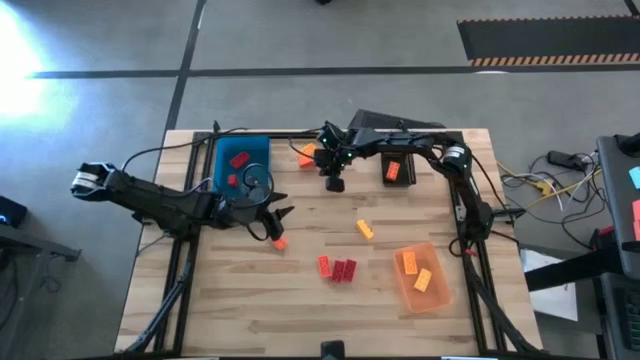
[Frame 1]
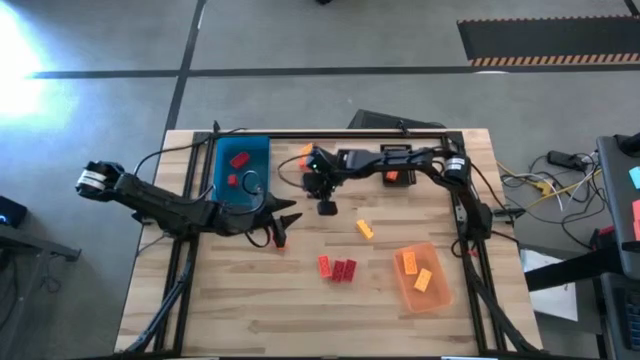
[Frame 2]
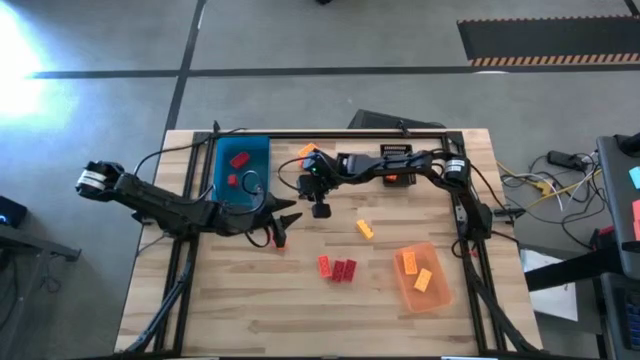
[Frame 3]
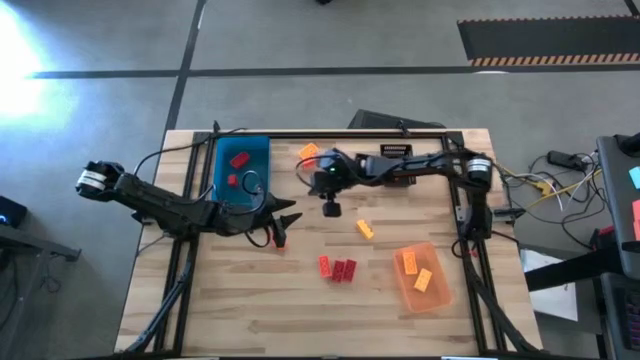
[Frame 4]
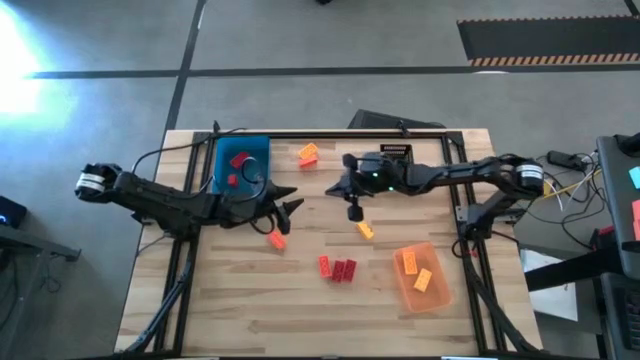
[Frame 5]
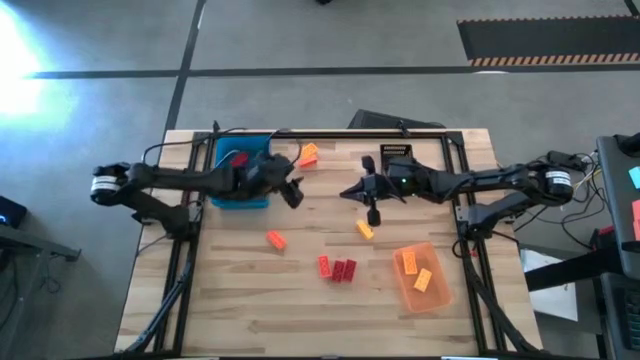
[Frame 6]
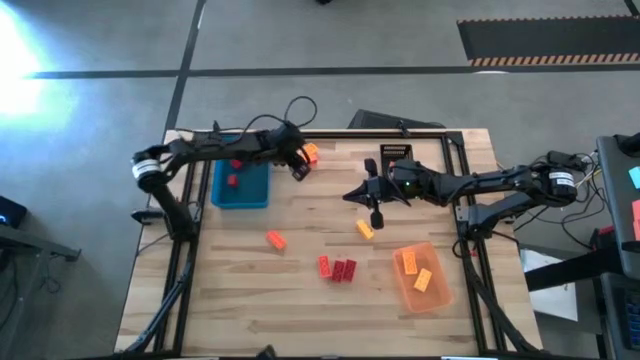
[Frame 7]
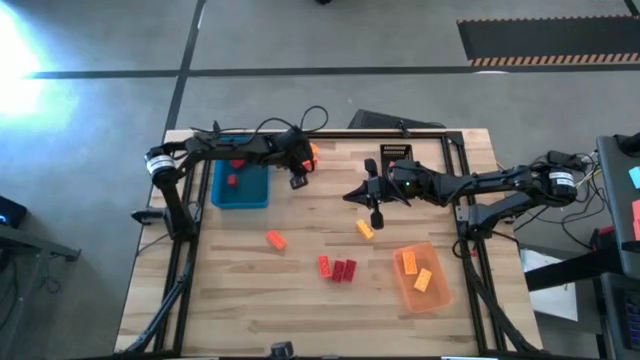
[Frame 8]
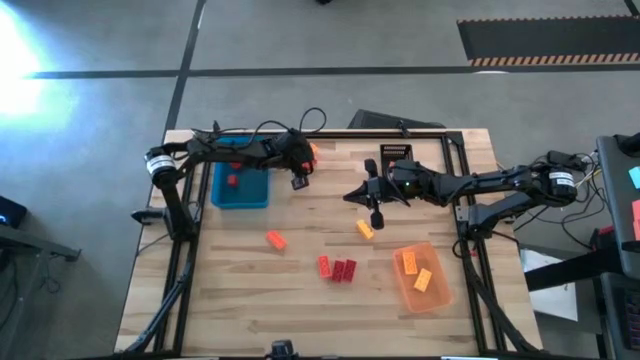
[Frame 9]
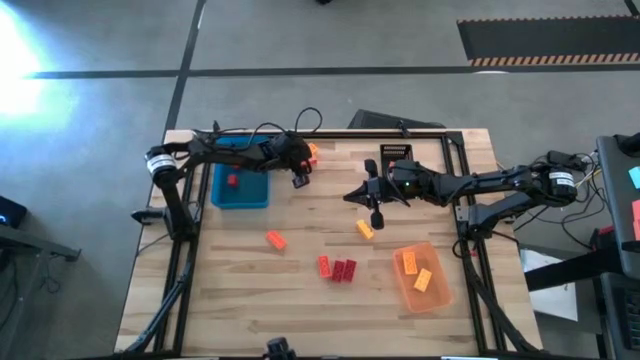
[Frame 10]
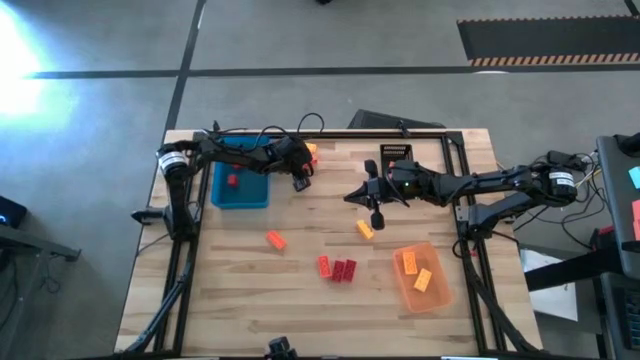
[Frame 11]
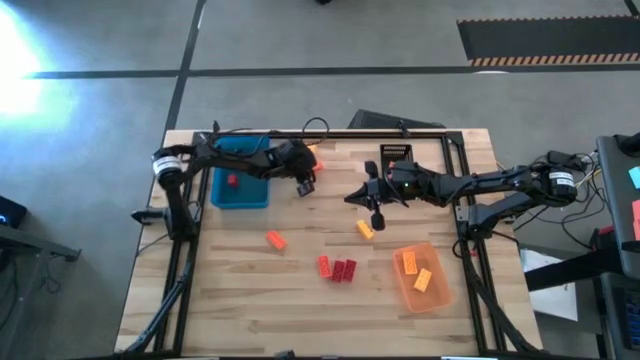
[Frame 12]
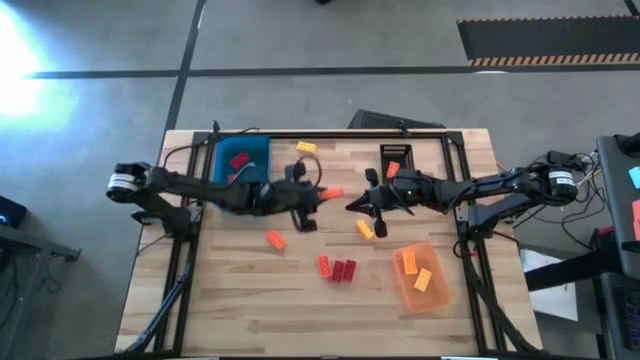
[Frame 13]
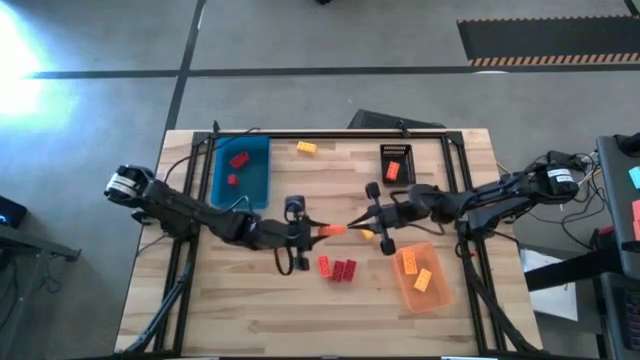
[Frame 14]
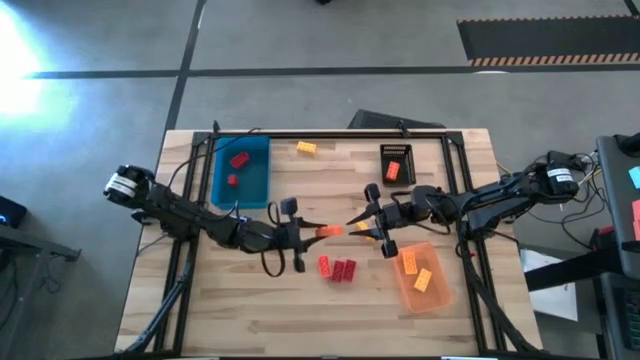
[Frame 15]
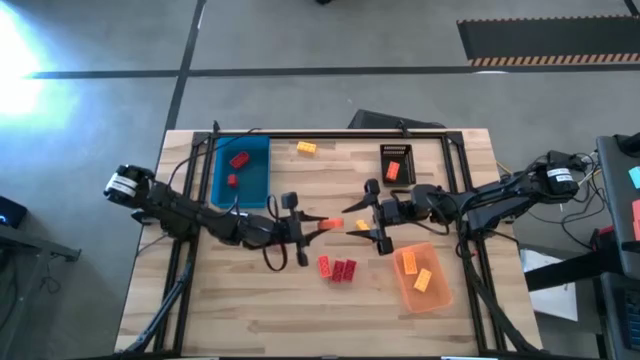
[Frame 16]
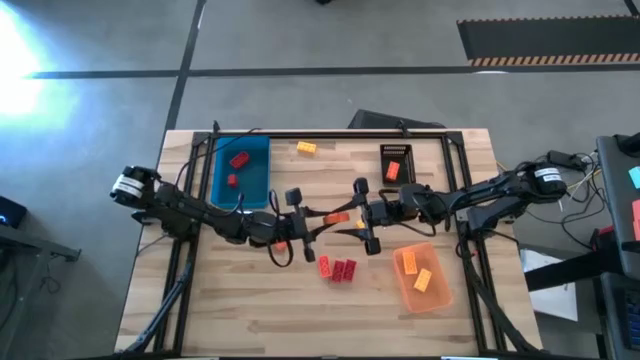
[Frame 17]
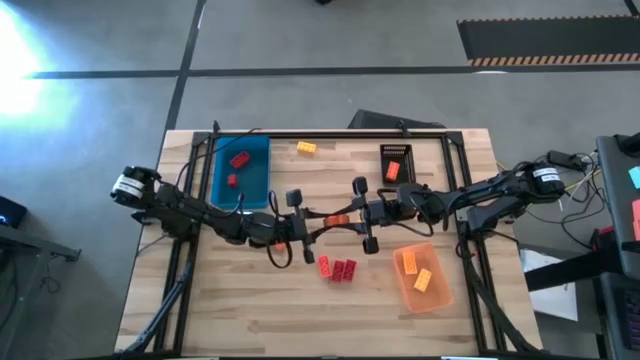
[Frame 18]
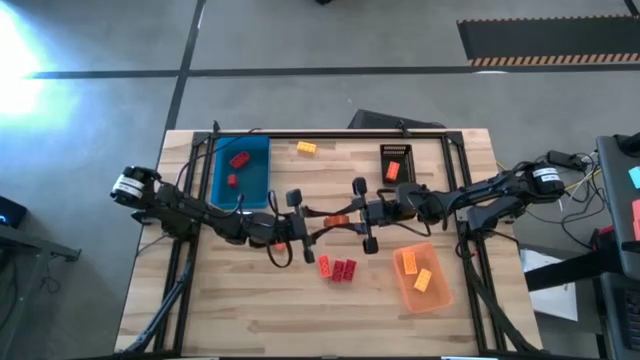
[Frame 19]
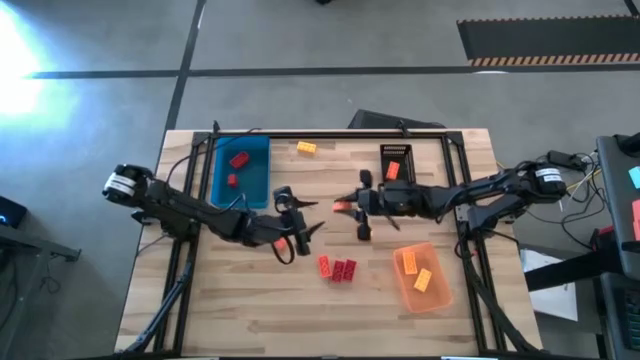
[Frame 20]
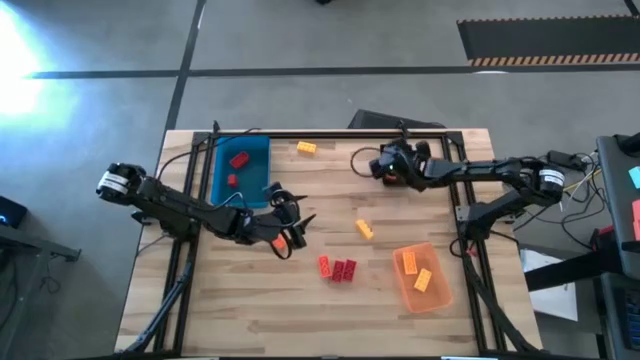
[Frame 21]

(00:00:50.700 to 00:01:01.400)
Task: Sort & place blocks by color
Put the orange game piece into the black bin

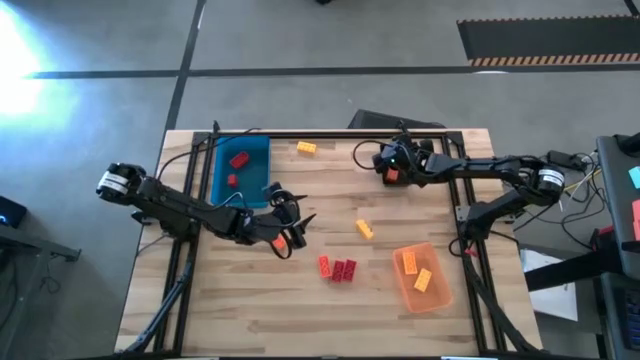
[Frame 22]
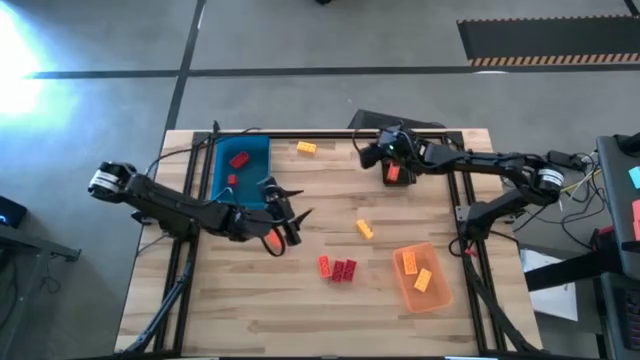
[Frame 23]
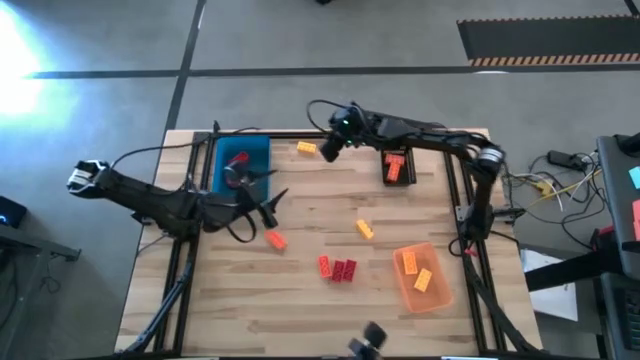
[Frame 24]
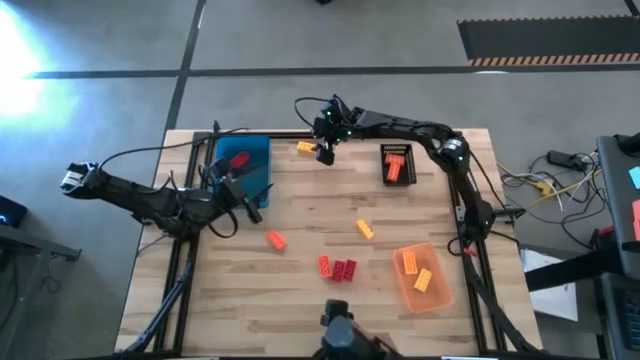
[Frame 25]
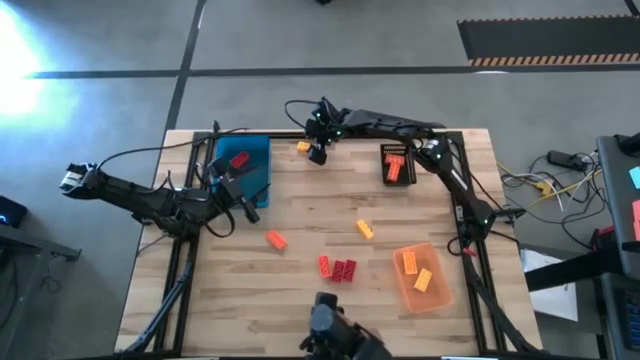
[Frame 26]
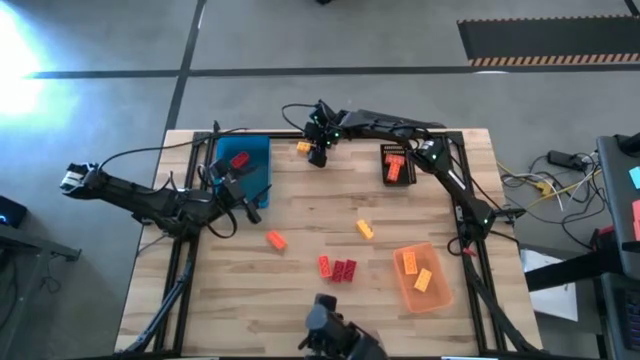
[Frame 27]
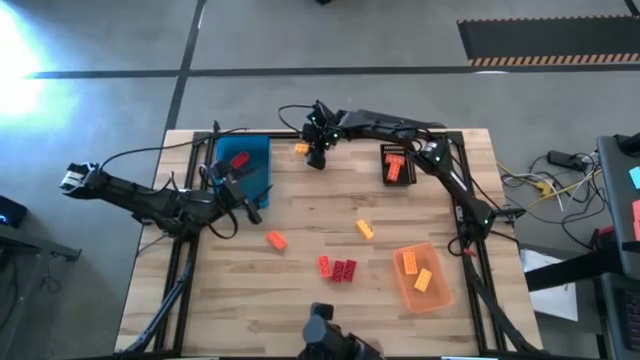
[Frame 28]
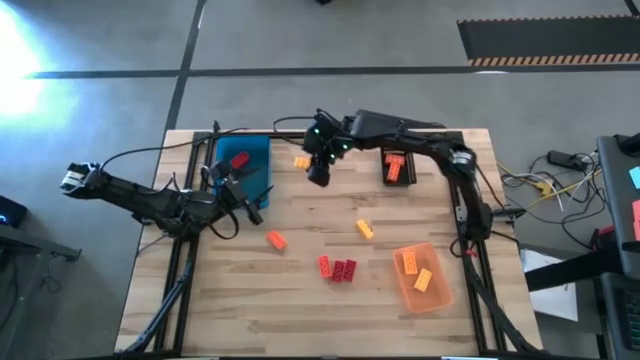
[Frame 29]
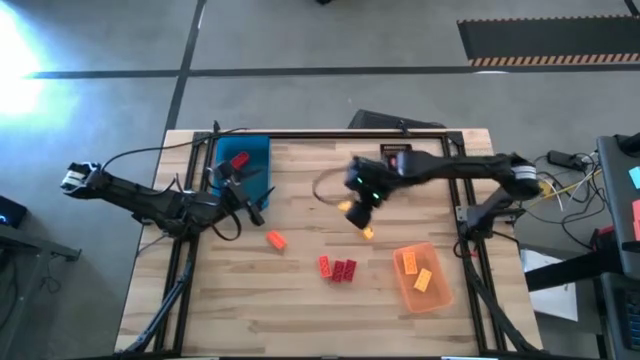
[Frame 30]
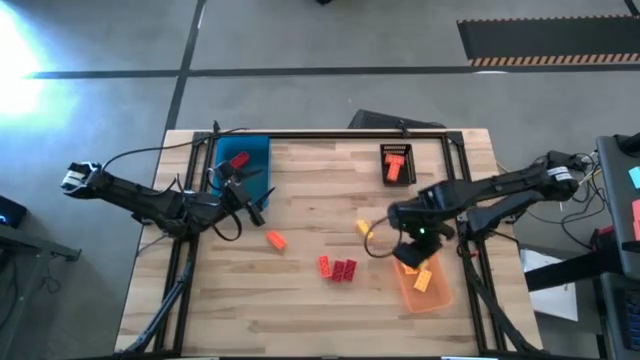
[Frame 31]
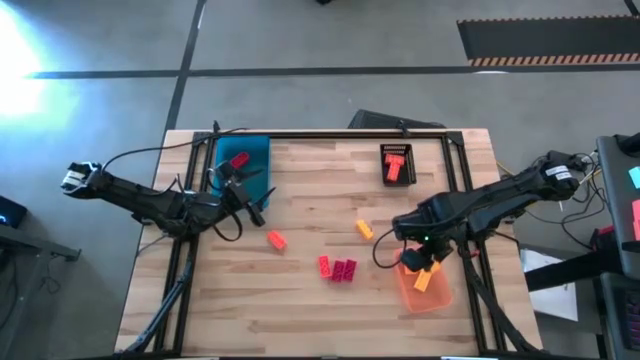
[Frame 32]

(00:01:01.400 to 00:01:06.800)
Put the yellow game piece into the orange bin

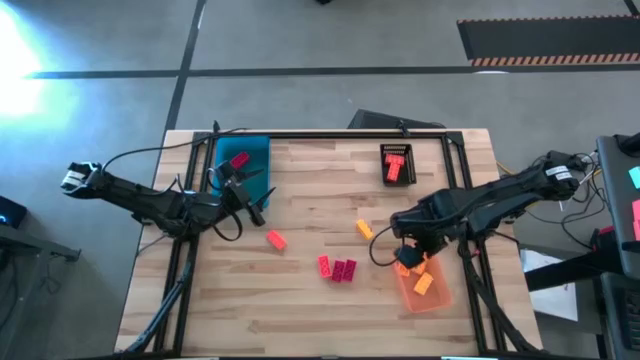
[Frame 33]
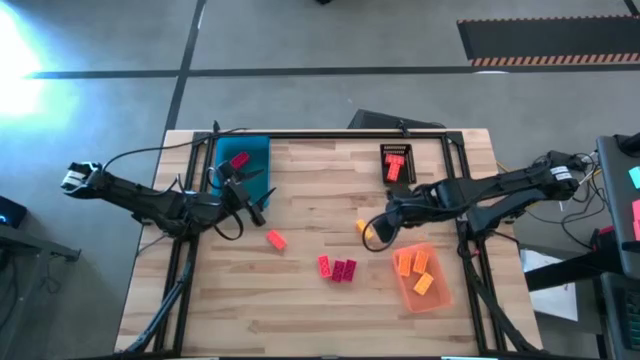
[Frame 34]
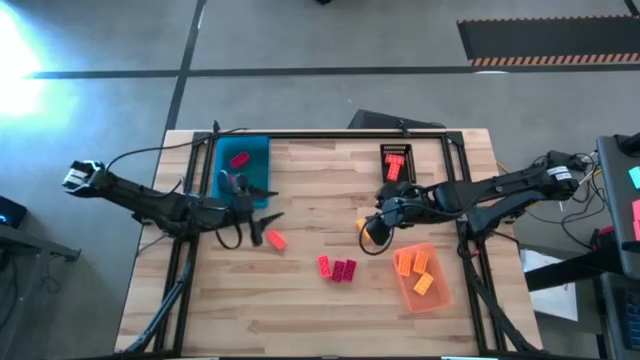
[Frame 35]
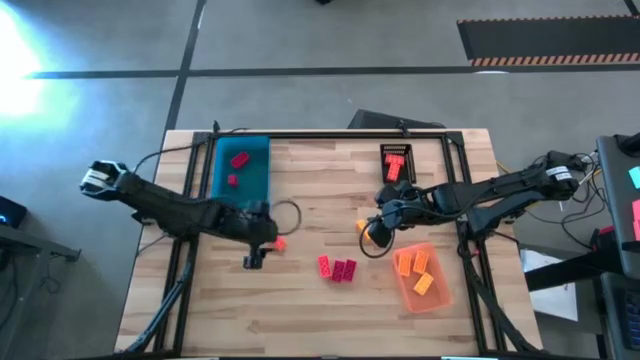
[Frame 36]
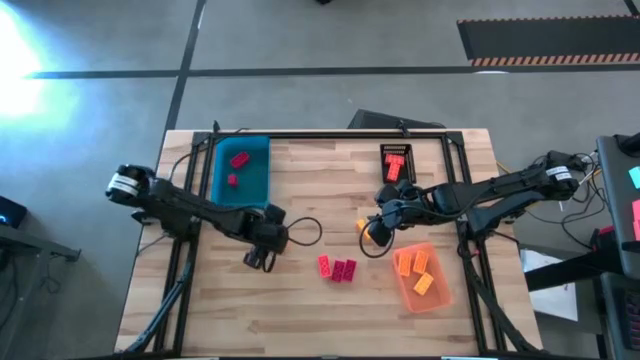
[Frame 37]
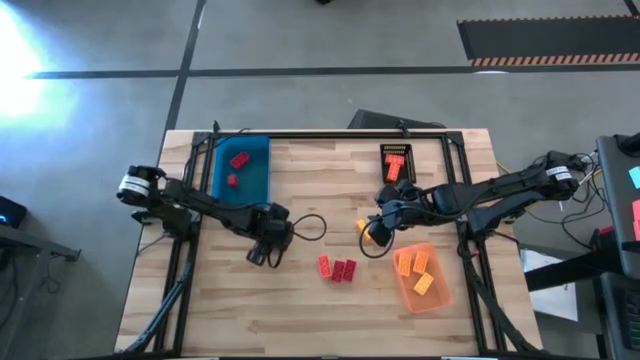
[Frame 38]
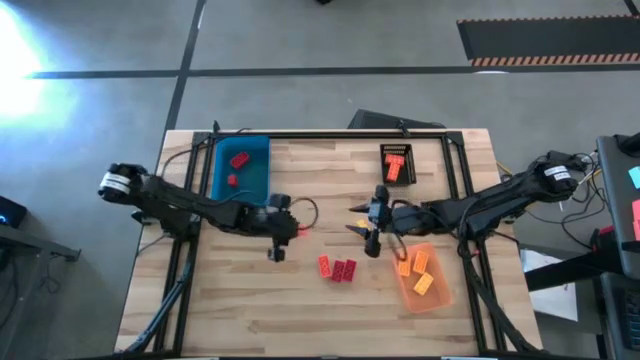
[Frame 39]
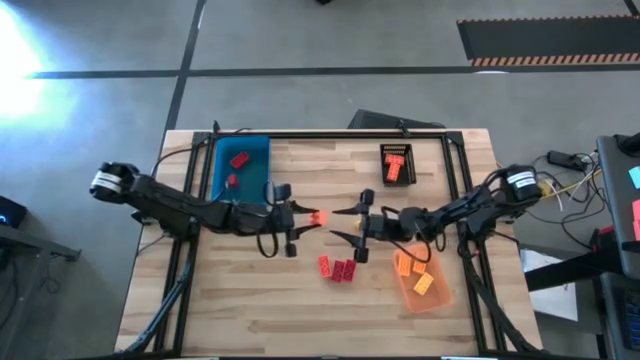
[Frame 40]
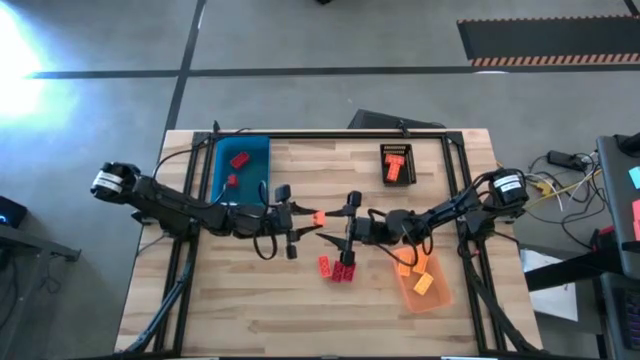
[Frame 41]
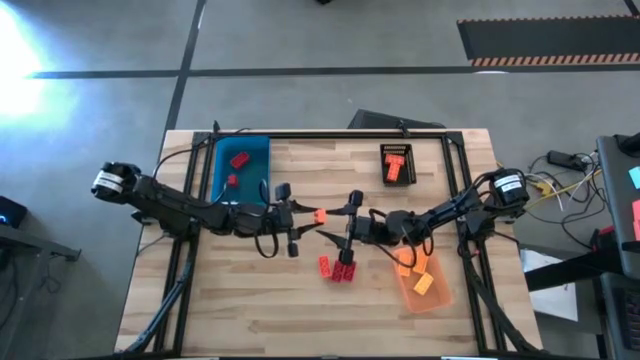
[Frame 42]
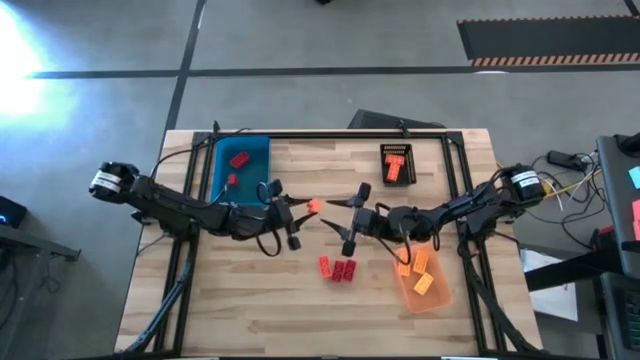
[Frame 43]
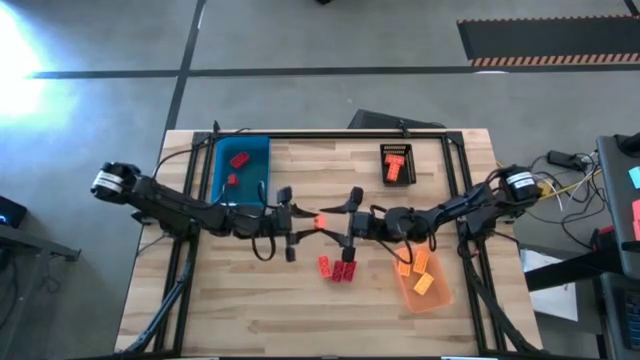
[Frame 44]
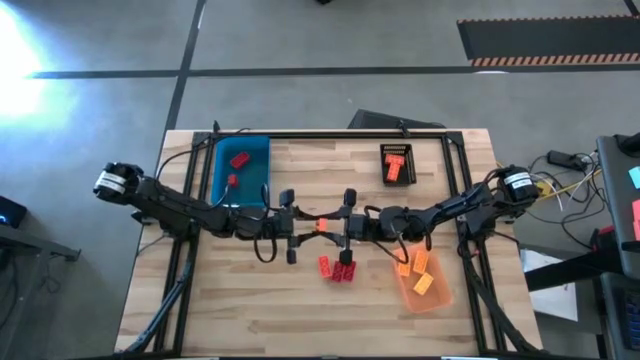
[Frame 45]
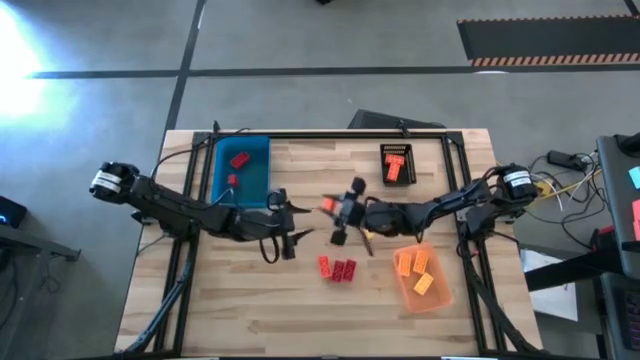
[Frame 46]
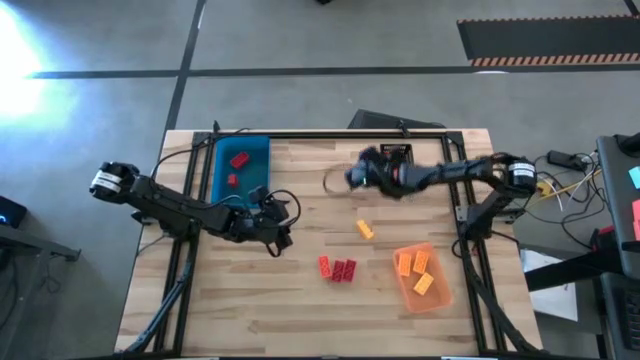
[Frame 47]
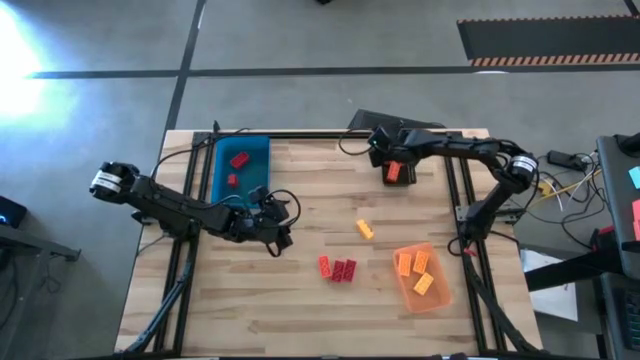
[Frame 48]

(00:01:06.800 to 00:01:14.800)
Put the orange game piece into the black bin
